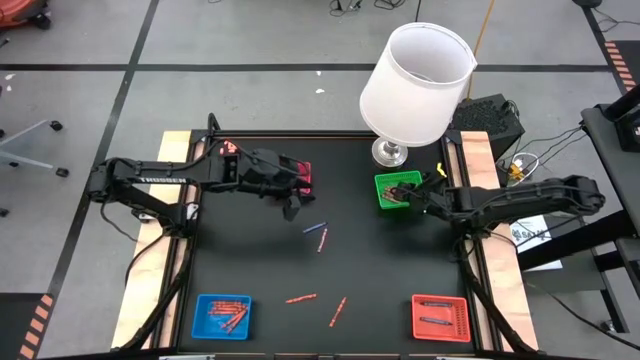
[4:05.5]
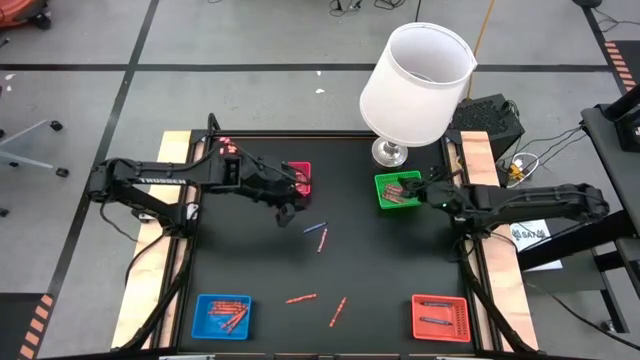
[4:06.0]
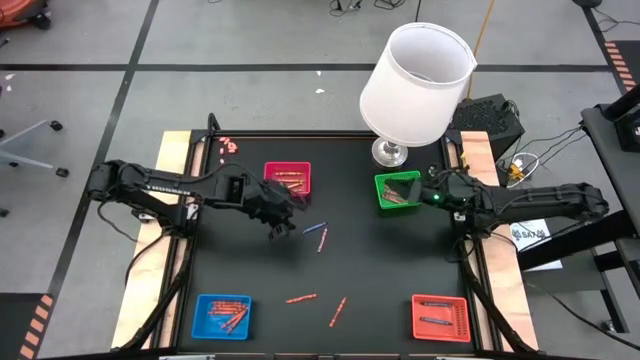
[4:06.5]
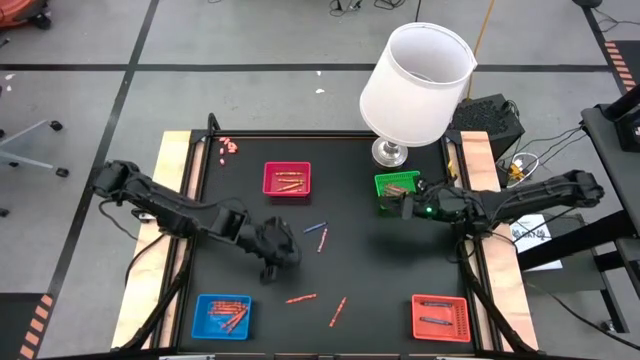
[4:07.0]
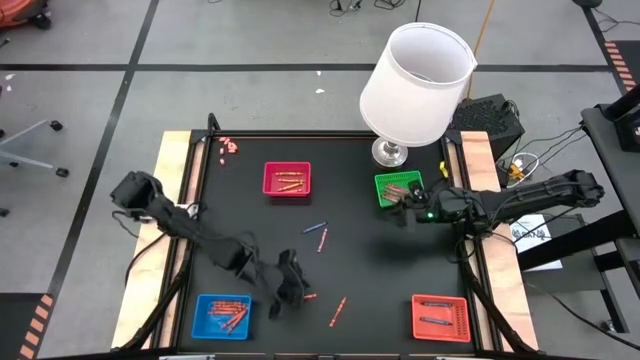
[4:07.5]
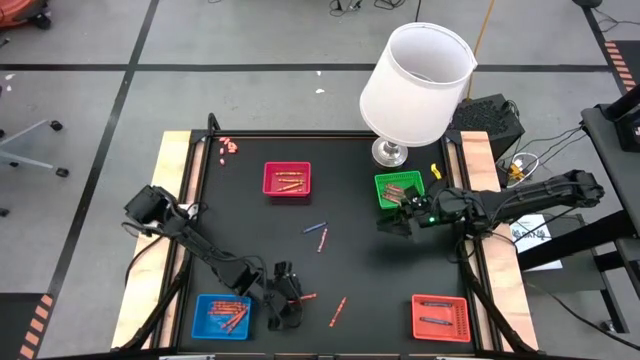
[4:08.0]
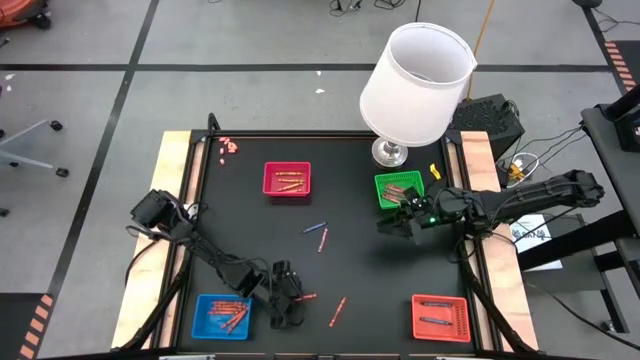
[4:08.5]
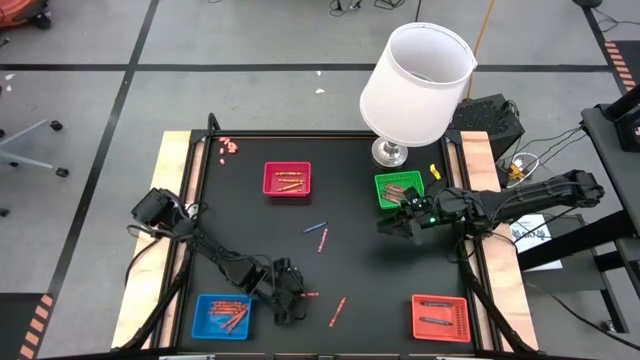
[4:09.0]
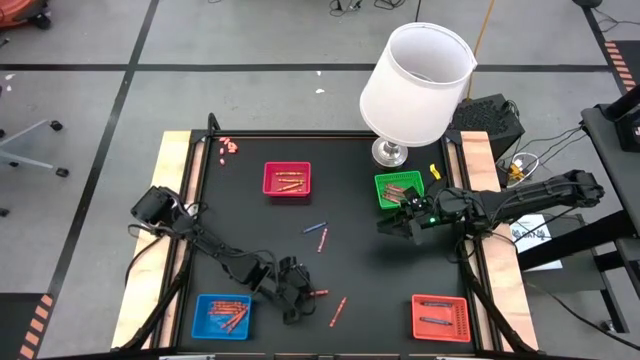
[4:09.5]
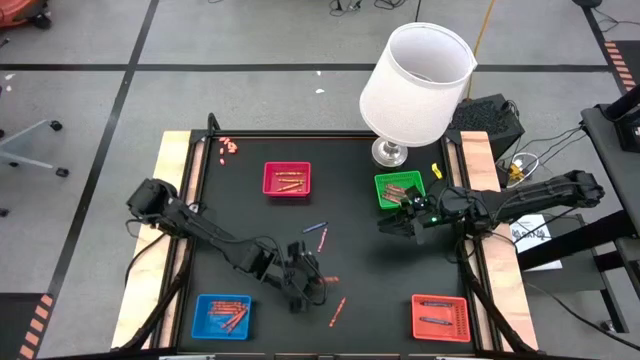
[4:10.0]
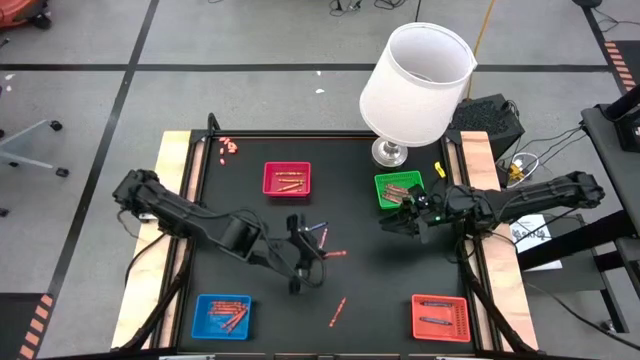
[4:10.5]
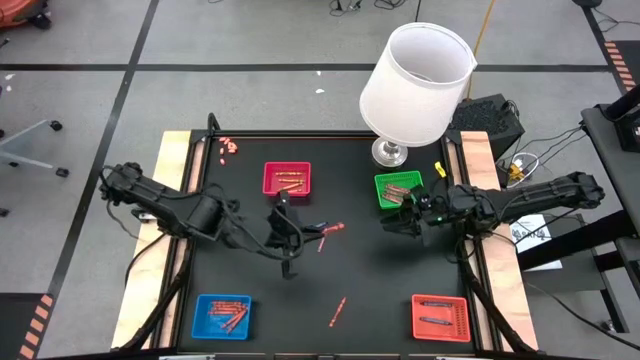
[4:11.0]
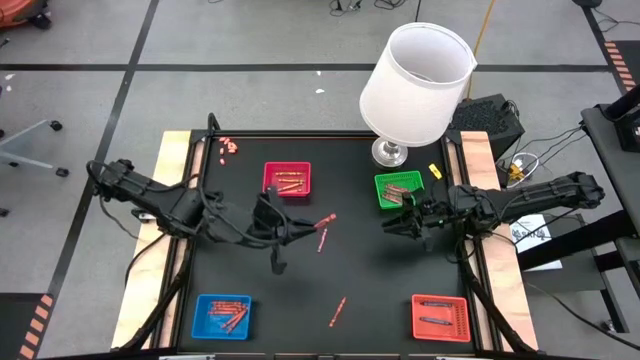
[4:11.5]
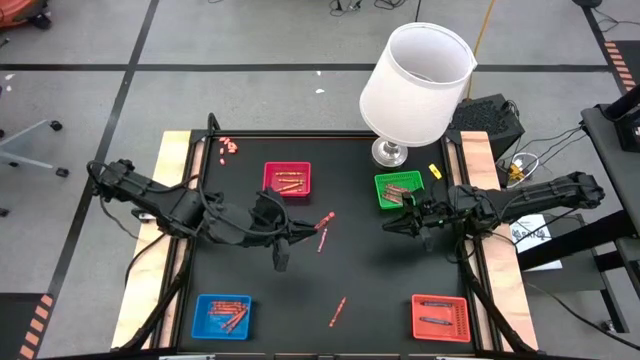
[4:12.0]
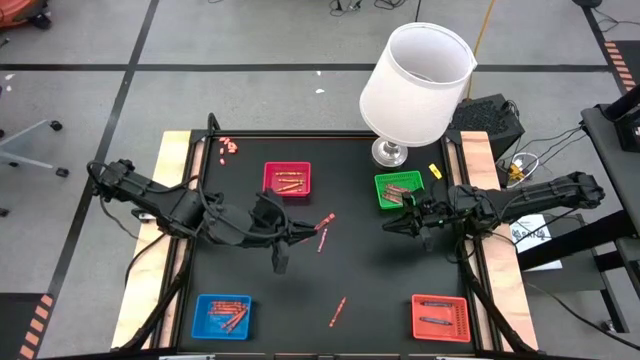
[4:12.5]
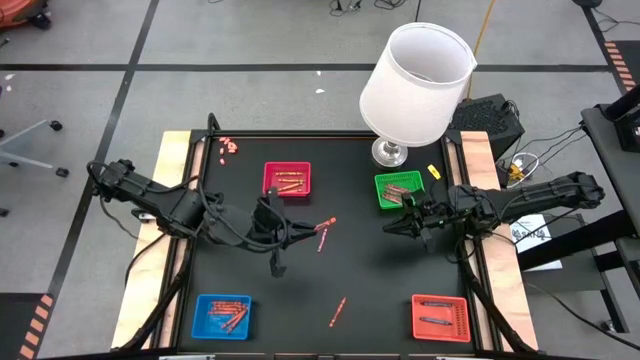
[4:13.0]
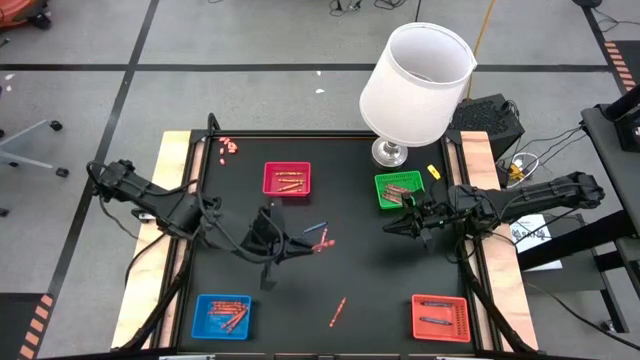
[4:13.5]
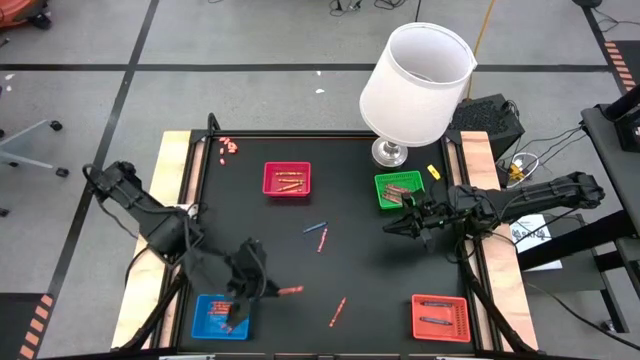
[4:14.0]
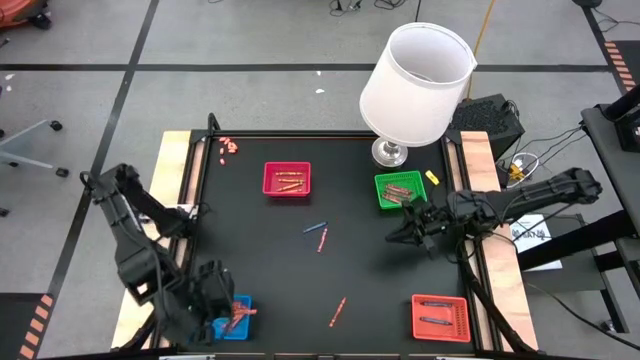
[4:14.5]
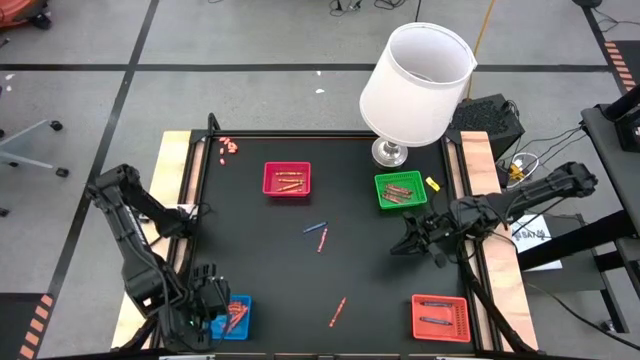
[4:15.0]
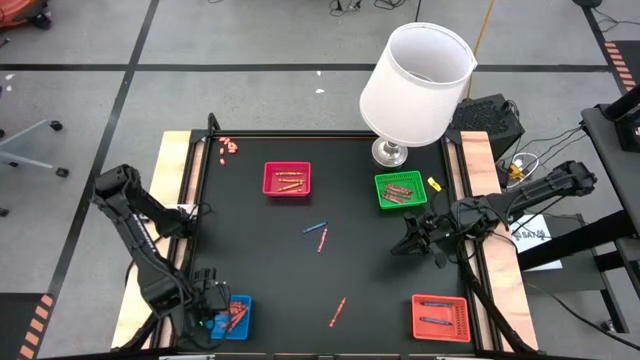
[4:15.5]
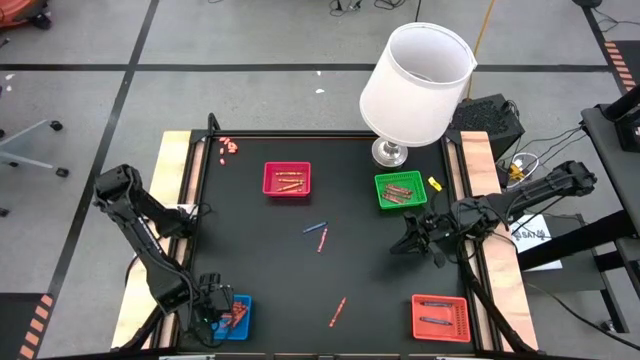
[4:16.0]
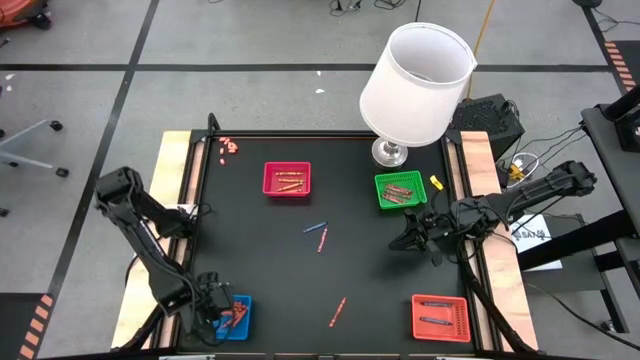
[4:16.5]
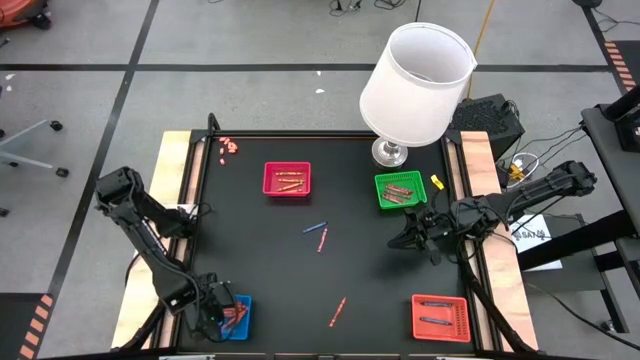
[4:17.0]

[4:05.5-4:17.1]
Task: Sort crayons
Put the orange crayon into the blue basket

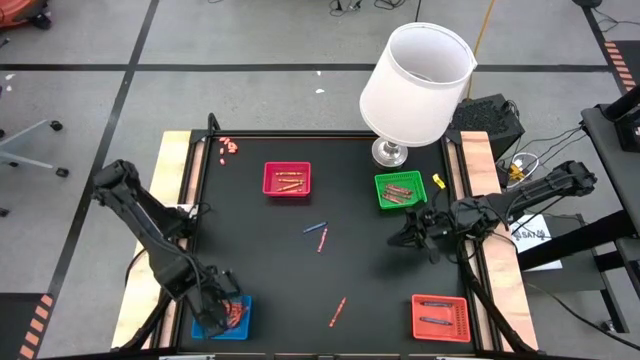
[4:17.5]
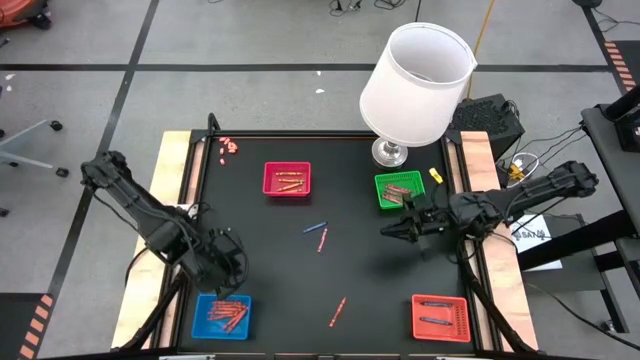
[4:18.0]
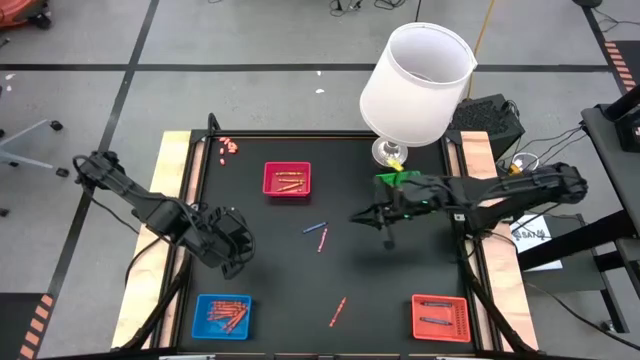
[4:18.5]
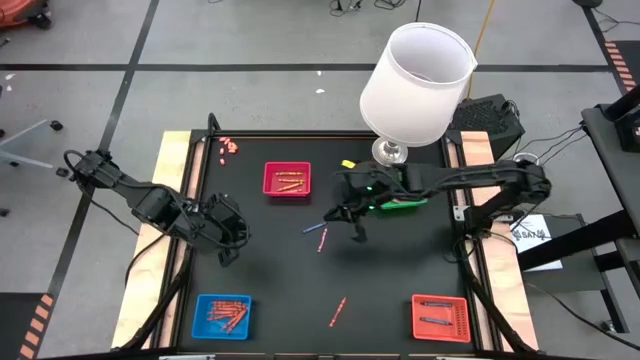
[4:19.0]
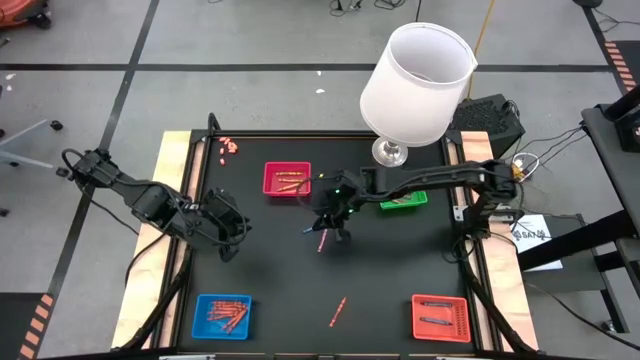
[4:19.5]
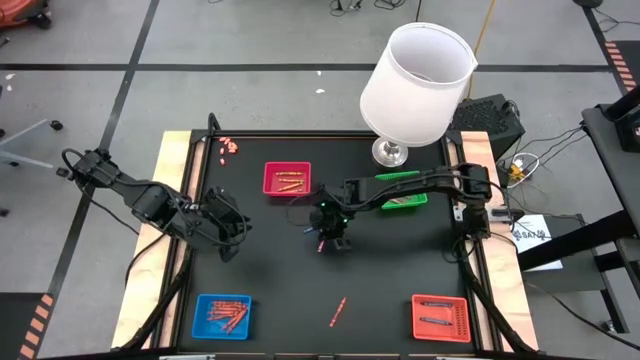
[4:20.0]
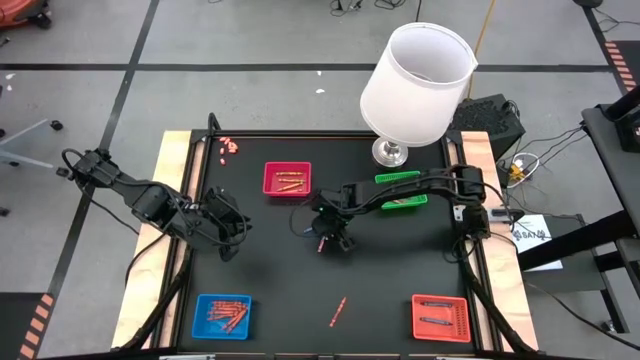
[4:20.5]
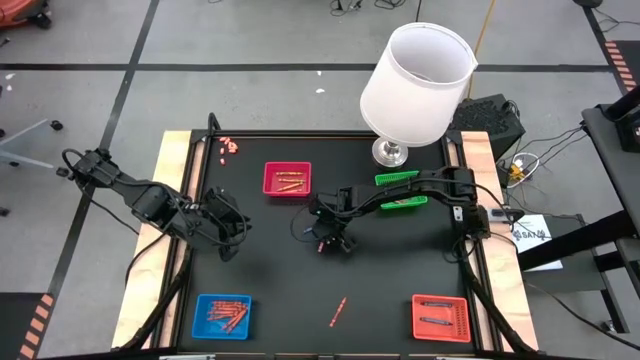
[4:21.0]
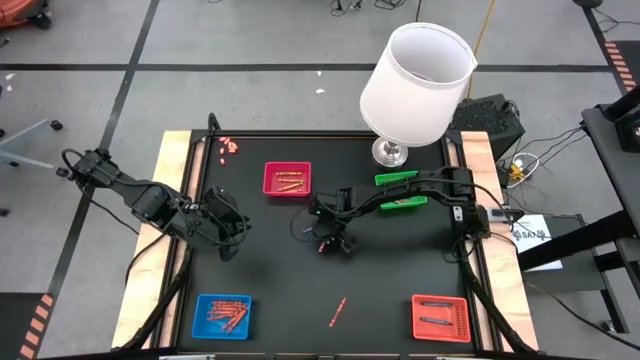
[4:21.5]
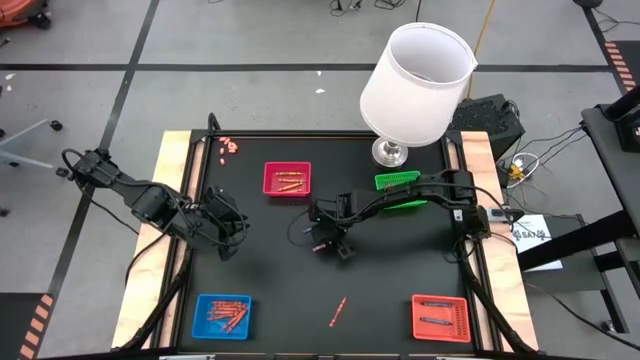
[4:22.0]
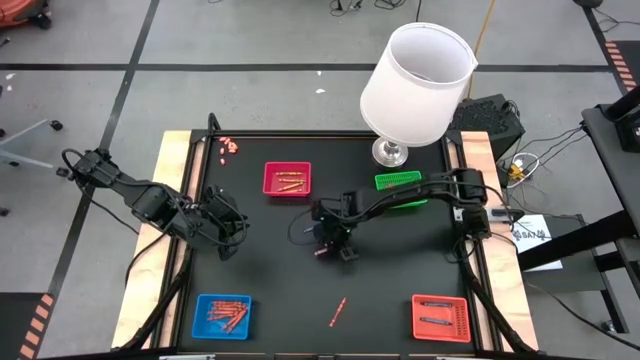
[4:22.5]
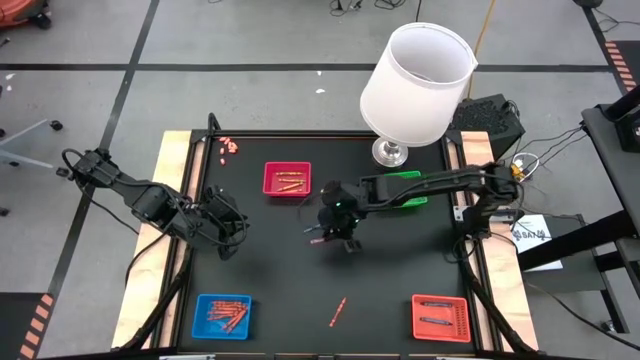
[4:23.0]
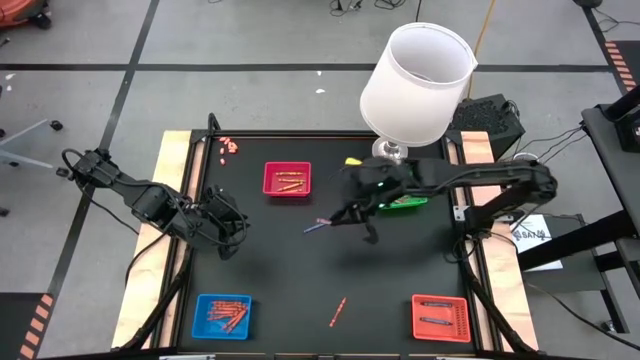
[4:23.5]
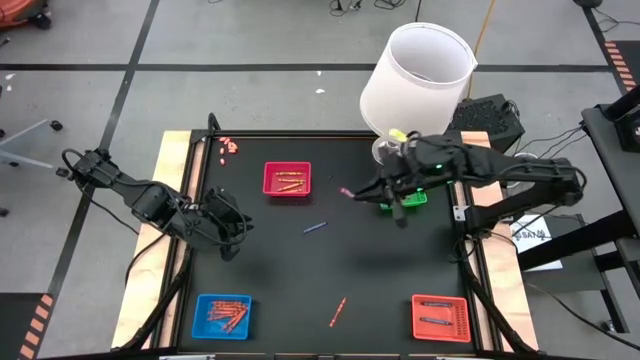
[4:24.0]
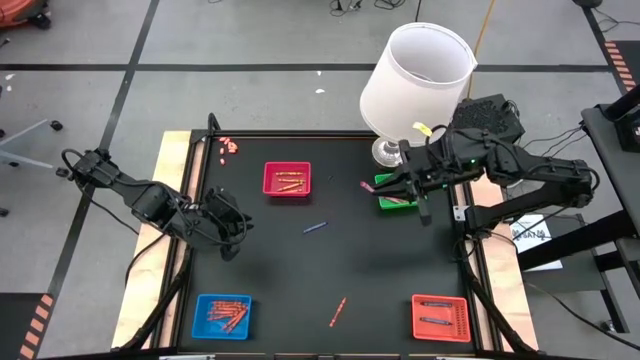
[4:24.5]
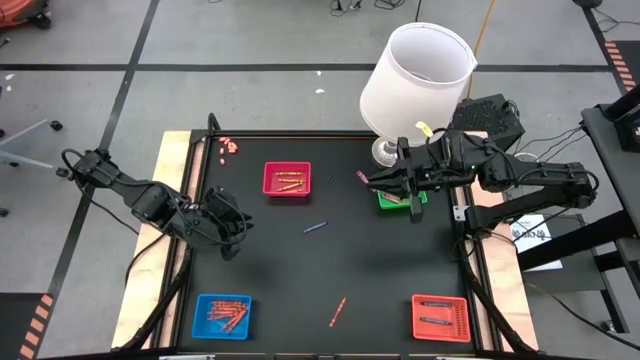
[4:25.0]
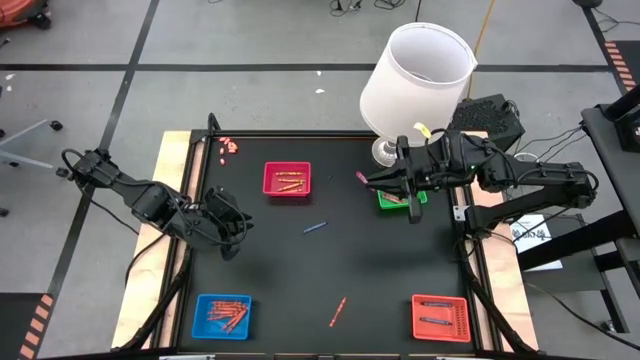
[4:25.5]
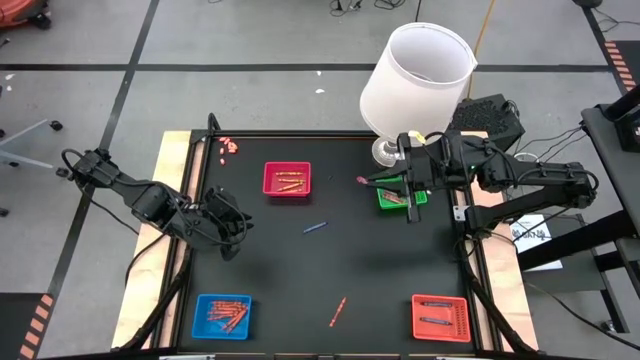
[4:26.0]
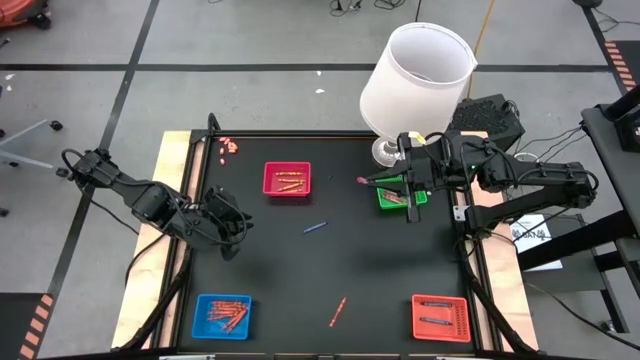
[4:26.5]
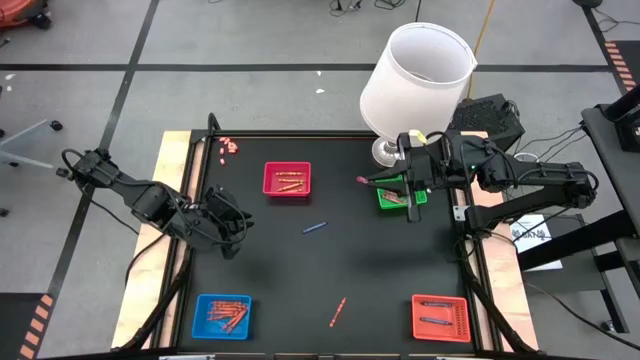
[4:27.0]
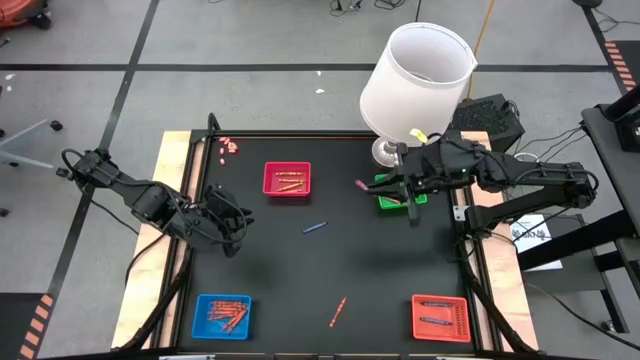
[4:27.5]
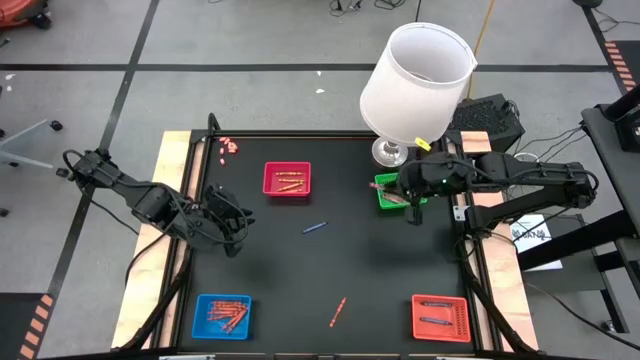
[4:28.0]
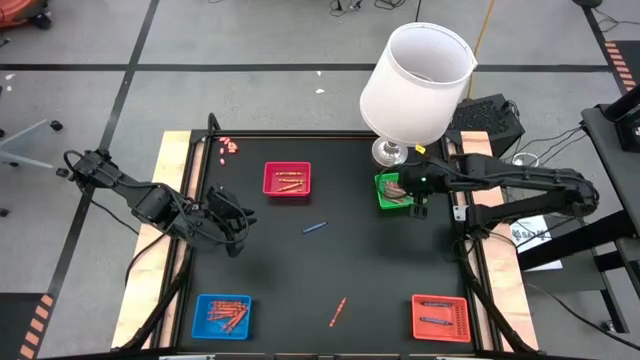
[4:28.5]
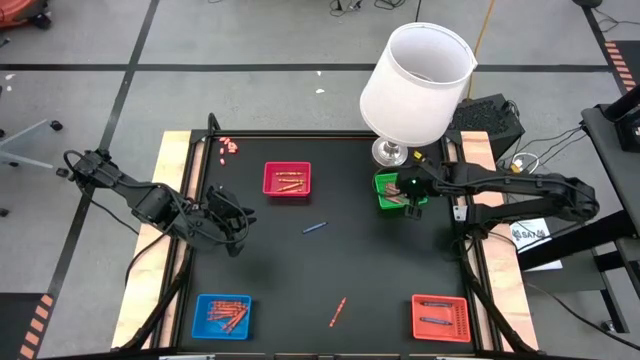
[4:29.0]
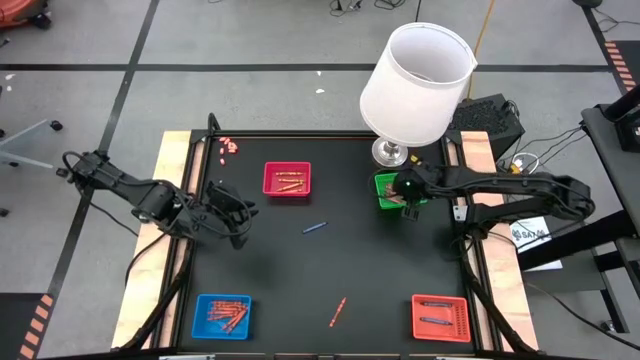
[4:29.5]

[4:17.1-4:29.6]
Put the red crayon into the green basket
